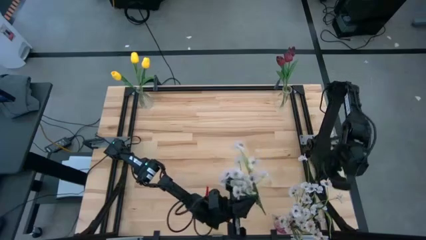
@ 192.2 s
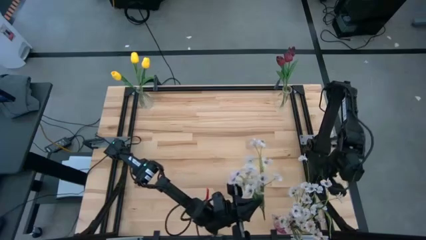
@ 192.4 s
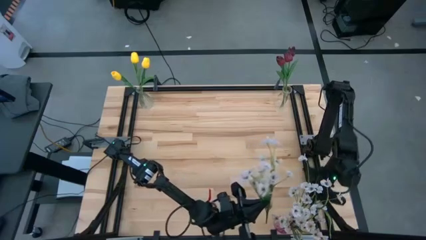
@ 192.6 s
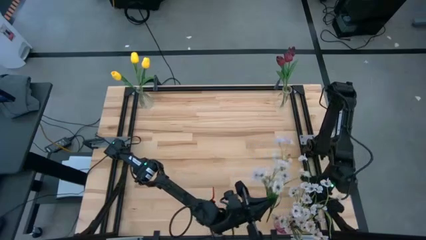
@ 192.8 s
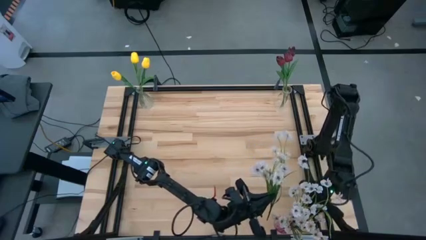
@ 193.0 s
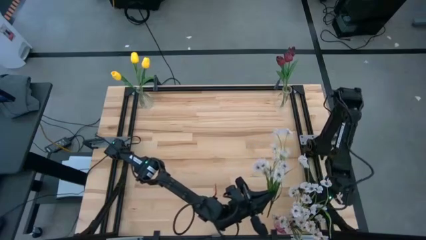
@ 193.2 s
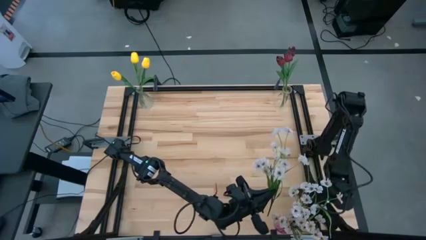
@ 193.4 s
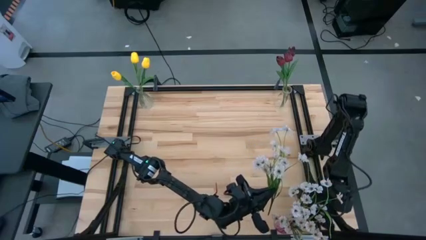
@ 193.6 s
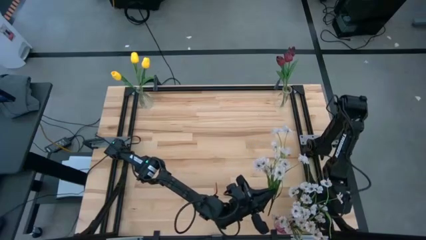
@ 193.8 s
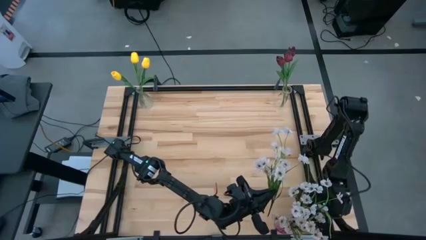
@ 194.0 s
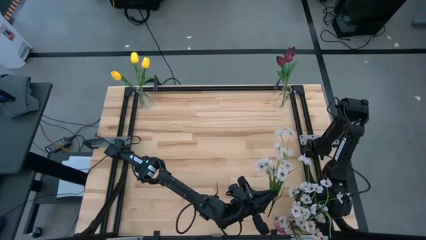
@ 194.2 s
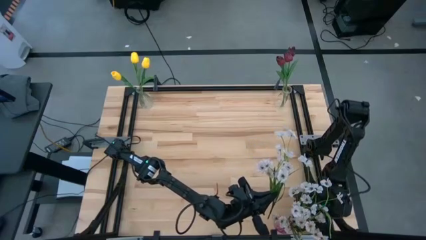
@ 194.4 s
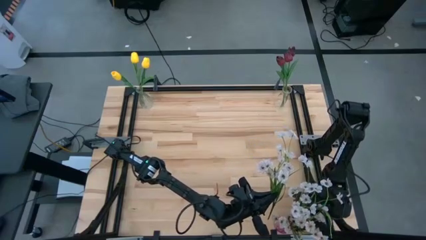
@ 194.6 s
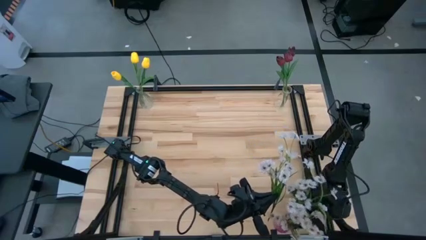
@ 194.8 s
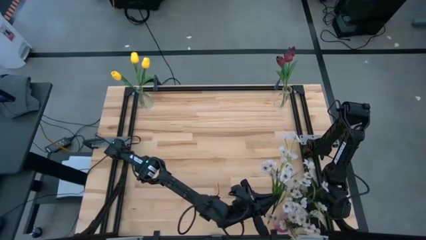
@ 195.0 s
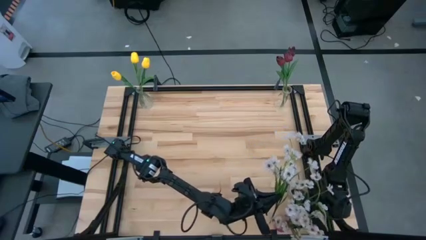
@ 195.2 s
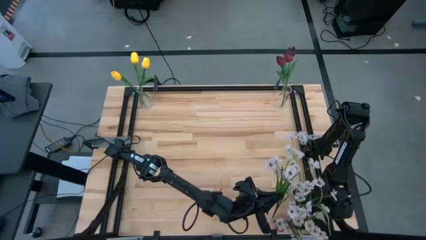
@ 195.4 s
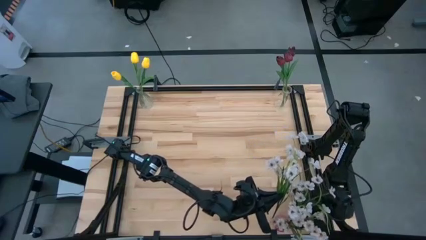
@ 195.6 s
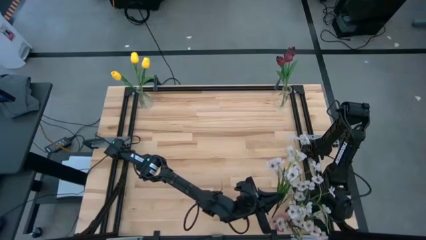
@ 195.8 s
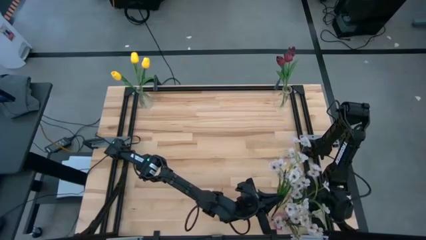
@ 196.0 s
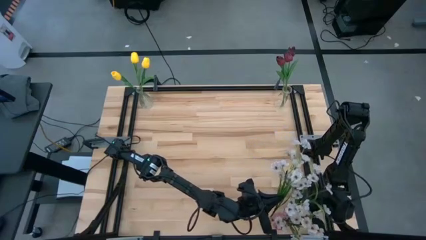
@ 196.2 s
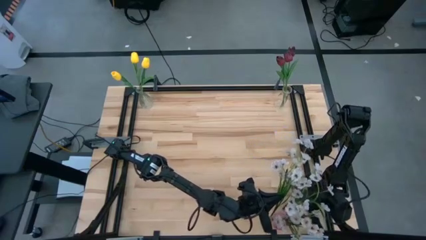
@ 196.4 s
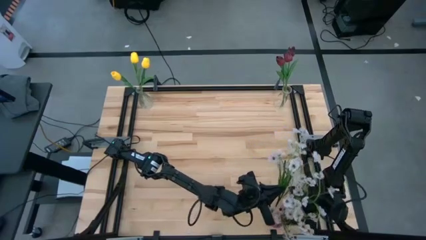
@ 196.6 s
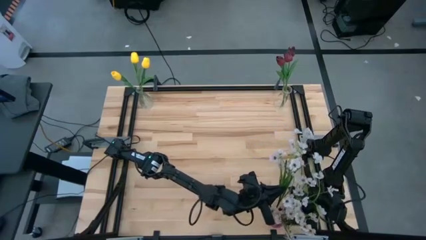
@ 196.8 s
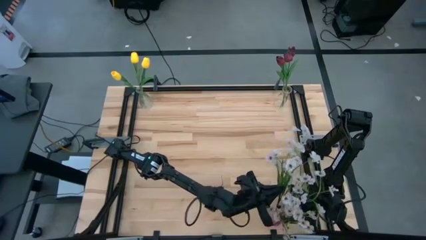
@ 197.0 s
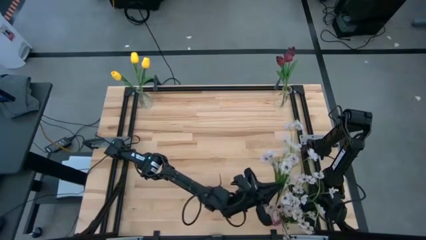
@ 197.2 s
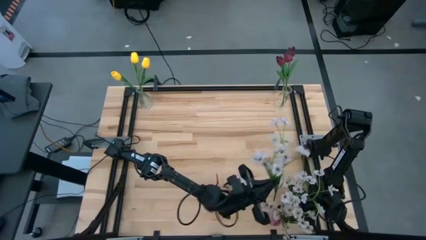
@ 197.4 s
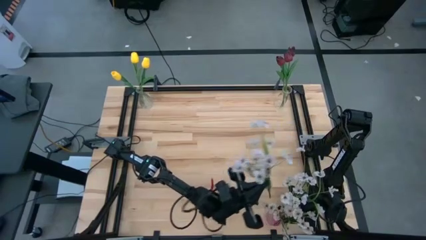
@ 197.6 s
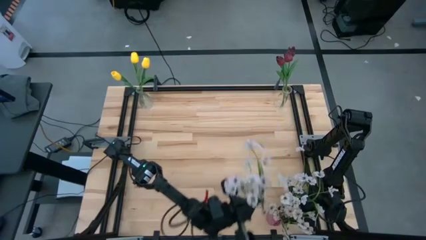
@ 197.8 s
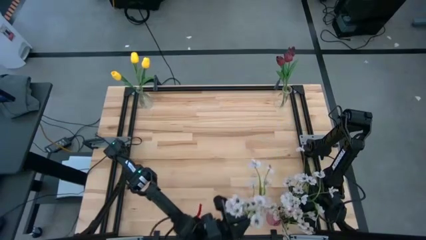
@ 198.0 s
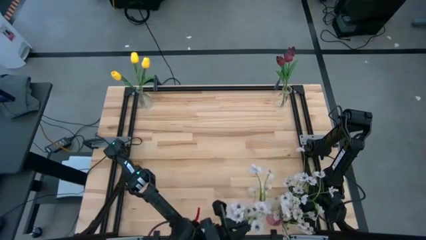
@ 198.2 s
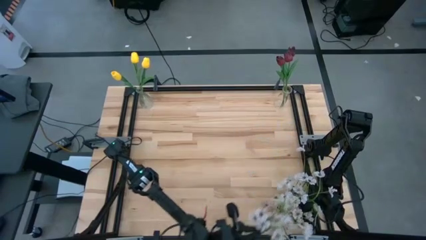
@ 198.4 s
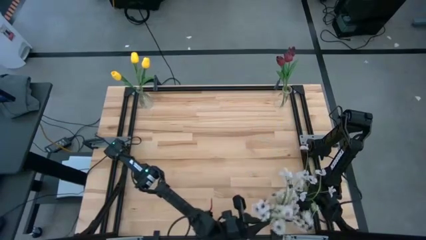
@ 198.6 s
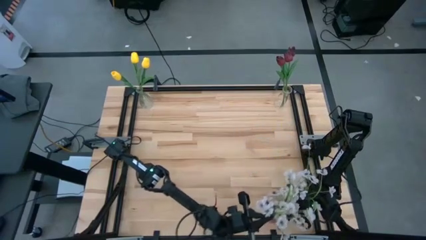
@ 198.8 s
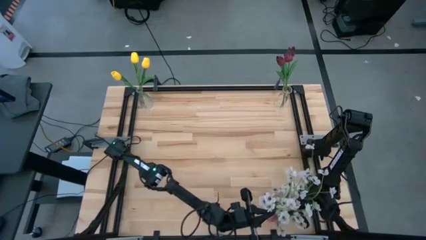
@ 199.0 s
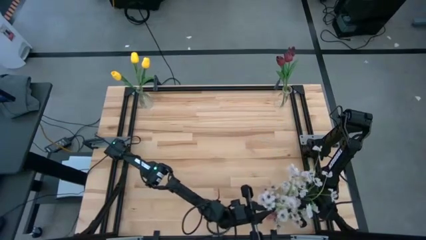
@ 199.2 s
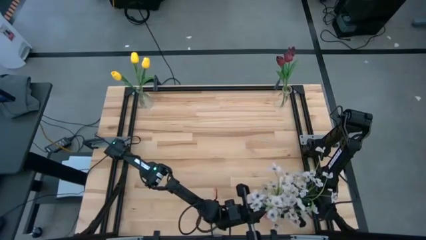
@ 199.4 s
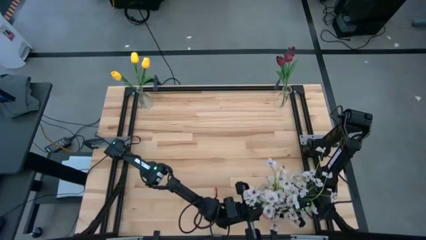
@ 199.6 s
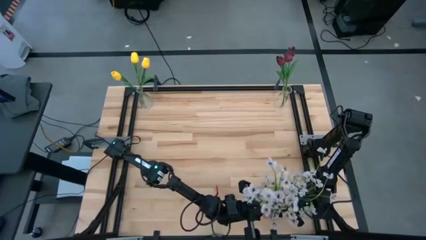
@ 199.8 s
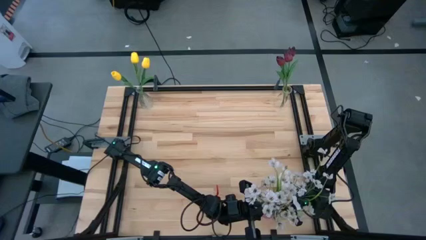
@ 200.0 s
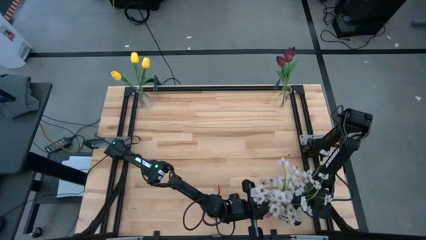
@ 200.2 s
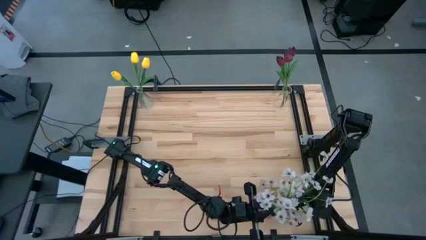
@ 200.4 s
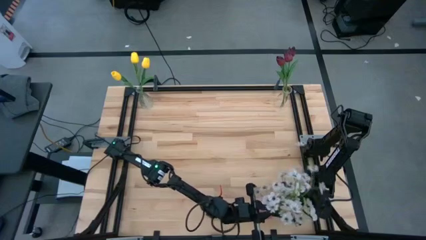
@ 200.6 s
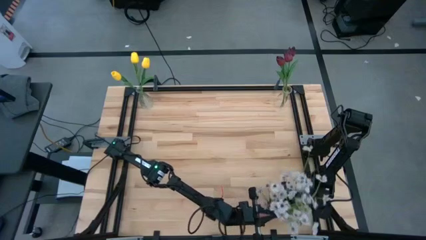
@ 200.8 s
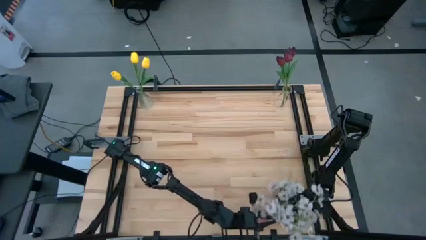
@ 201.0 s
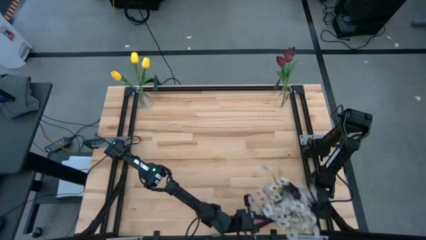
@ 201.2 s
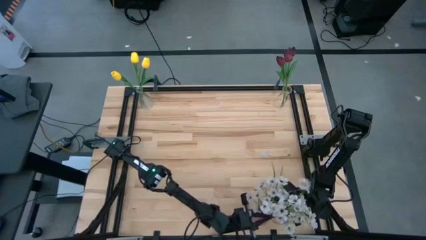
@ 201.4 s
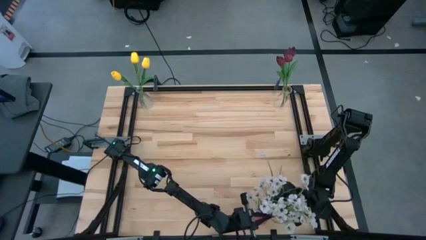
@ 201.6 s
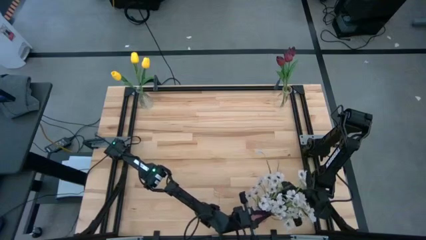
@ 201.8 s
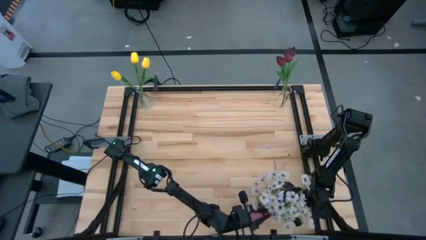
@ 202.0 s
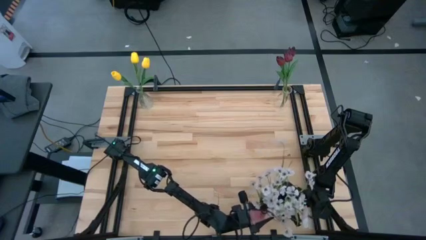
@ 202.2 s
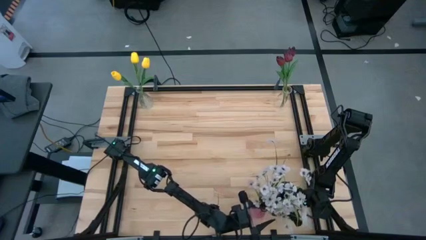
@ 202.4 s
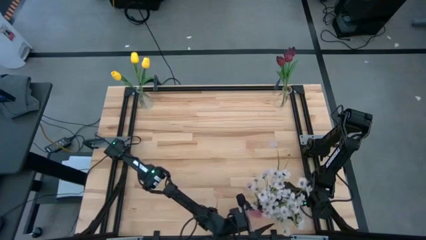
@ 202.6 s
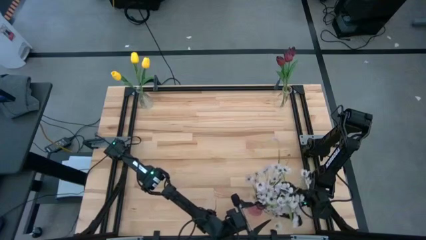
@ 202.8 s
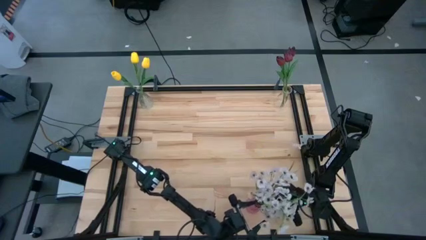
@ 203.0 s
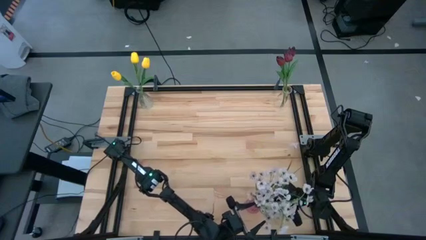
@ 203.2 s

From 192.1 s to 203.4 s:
Task: Sort flowers into vase by color
Put the white flowers into the purple vase
